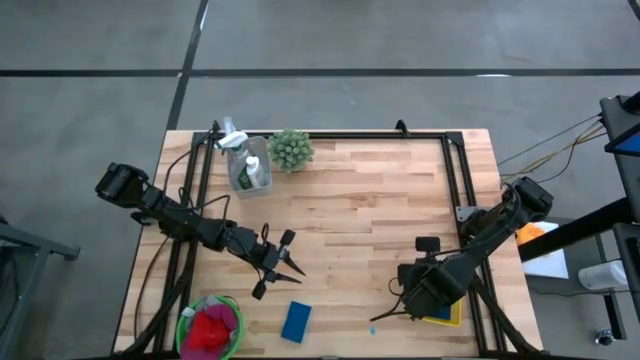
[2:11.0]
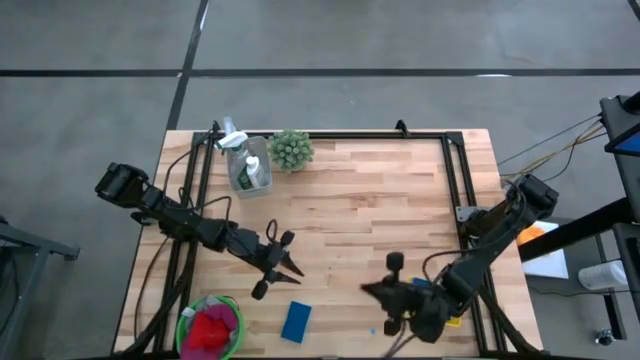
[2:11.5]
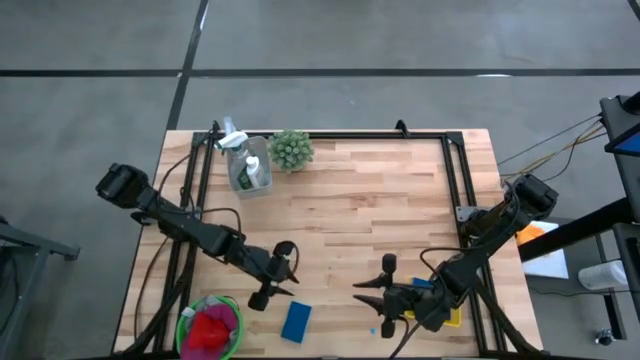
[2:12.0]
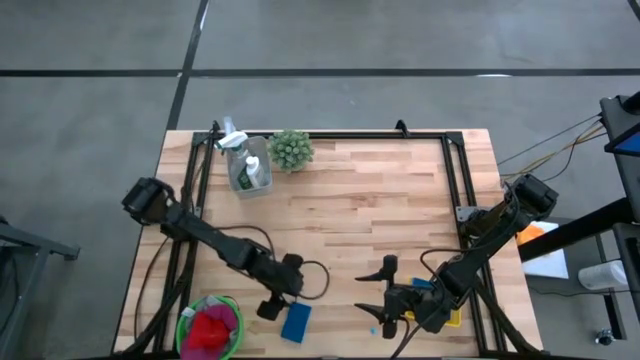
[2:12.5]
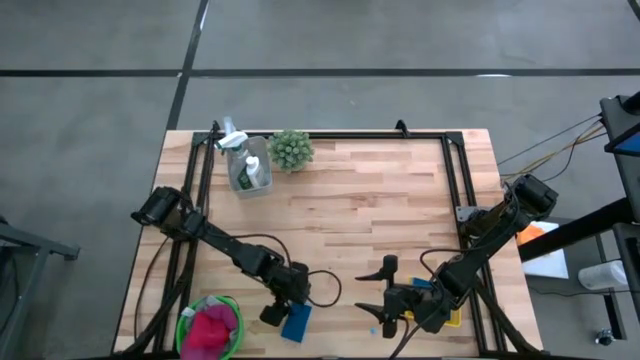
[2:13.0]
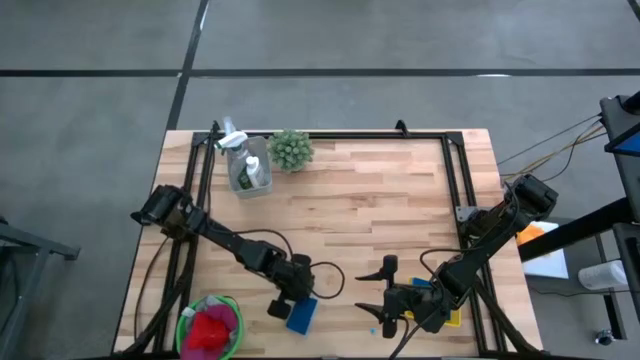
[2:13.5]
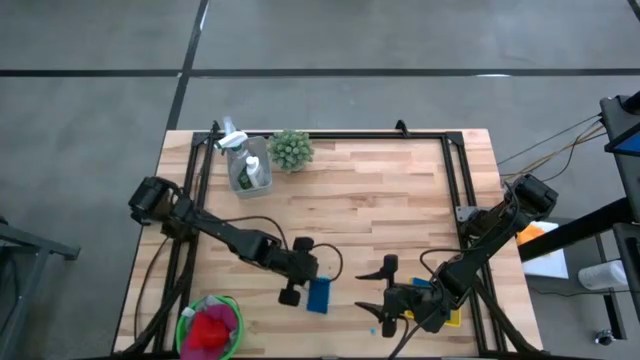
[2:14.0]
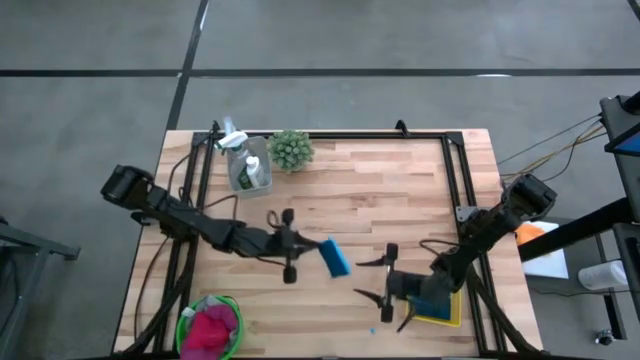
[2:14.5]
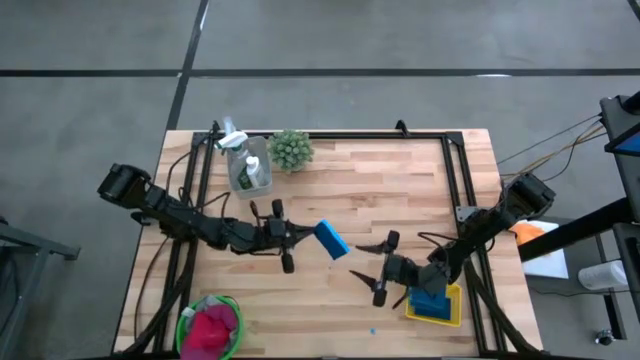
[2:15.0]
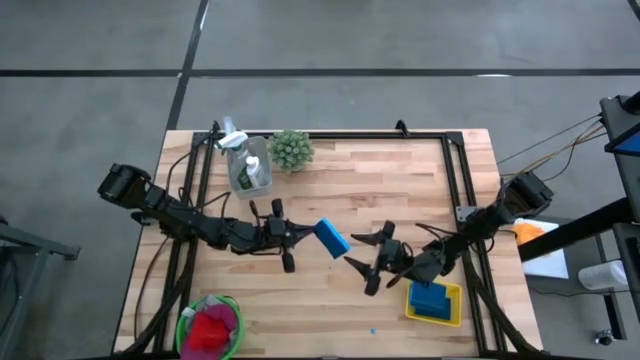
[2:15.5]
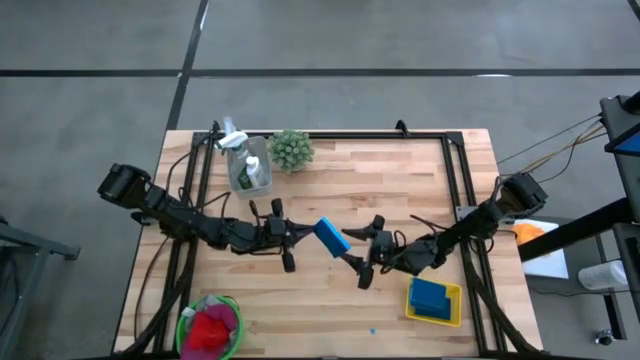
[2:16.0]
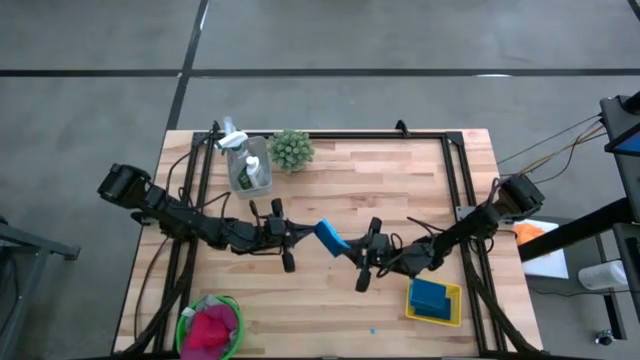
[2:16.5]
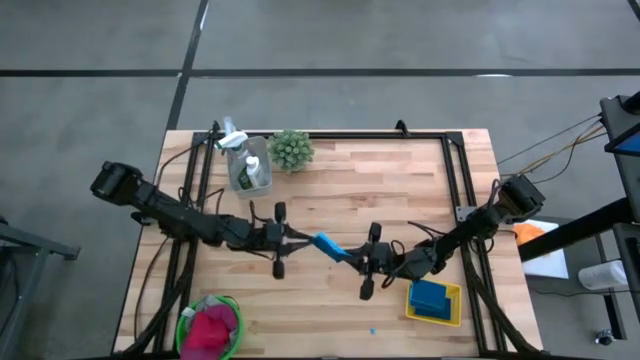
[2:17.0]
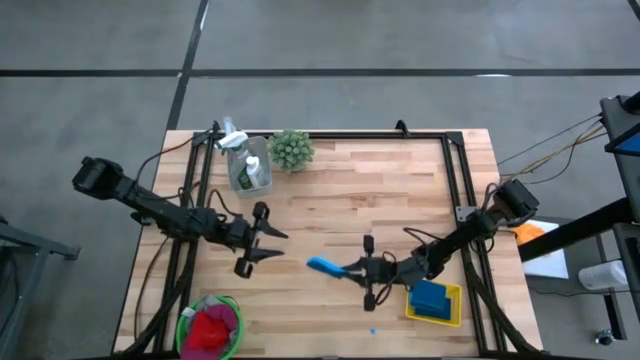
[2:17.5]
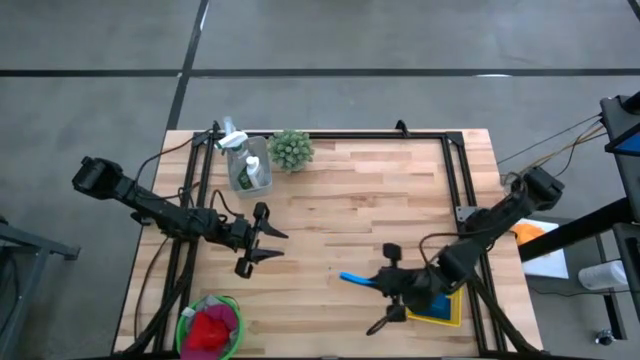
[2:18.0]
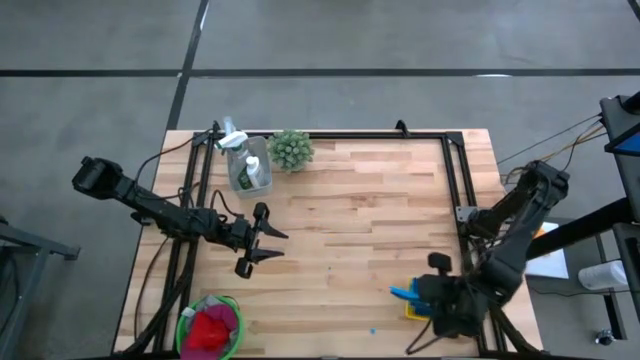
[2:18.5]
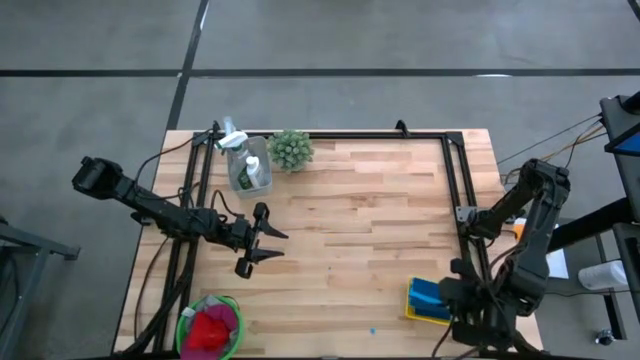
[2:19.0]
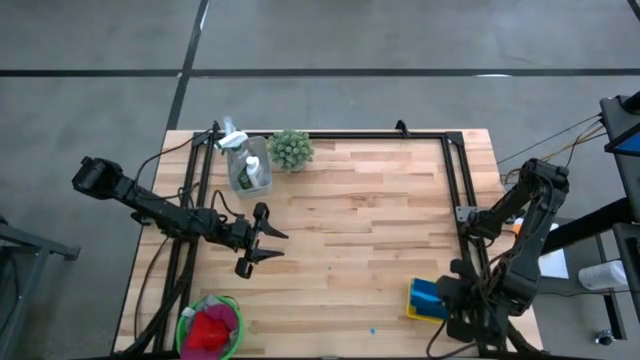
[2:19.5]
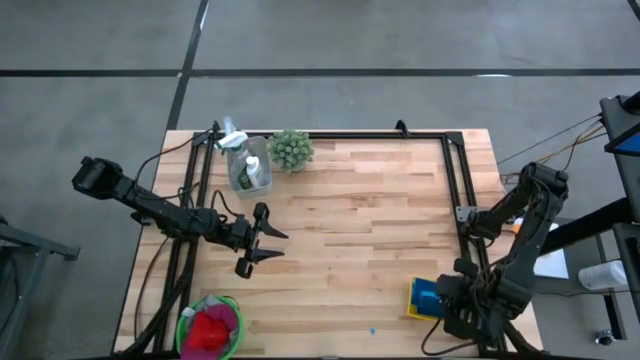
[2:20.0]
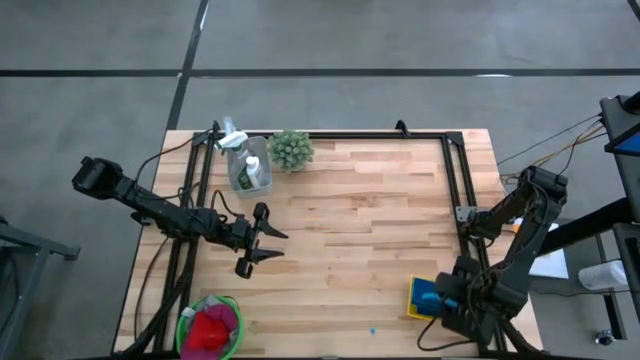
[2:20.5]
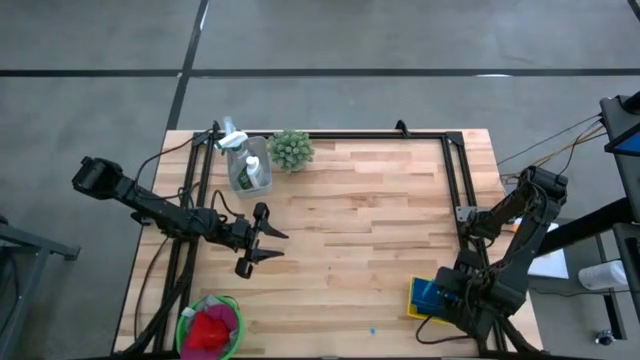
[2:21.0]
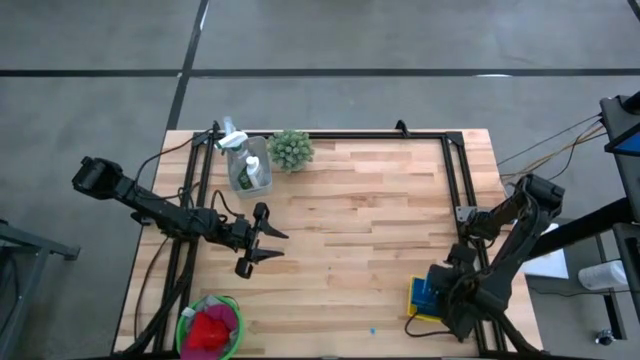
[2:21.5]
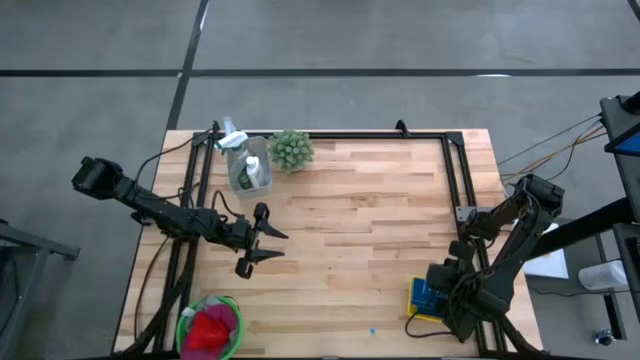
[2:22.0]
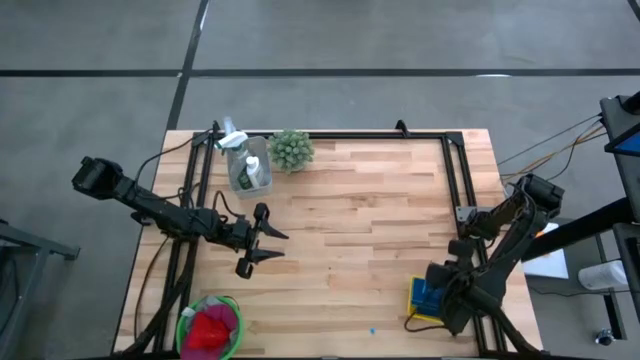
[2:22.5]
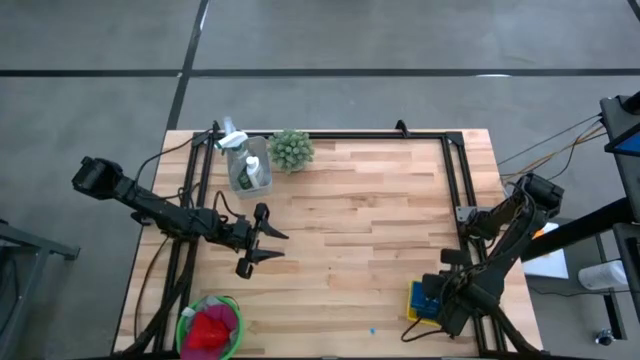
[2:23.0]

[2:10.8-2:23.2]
Task: Pick & Place Kitchen Items
Put the blue sponge into the yellow bin

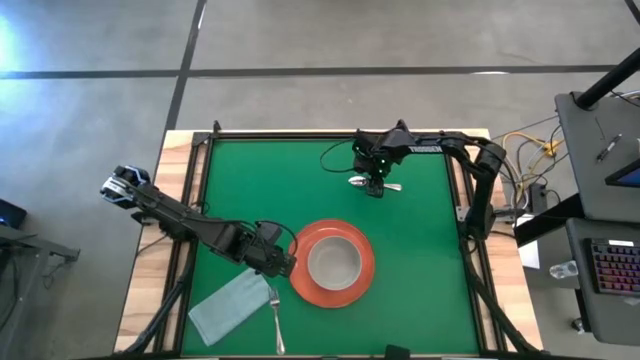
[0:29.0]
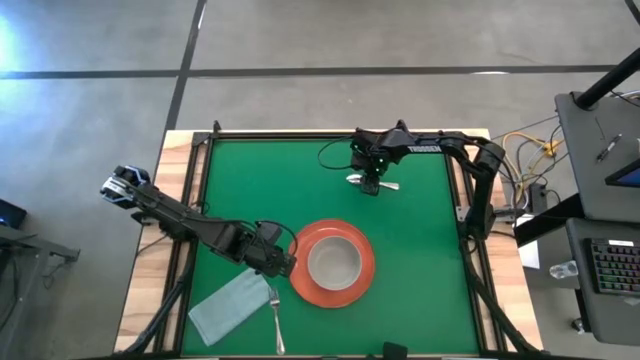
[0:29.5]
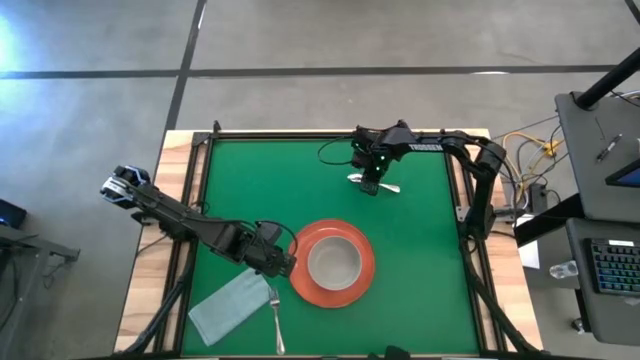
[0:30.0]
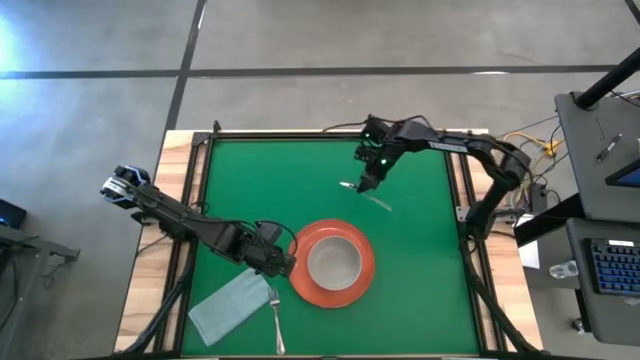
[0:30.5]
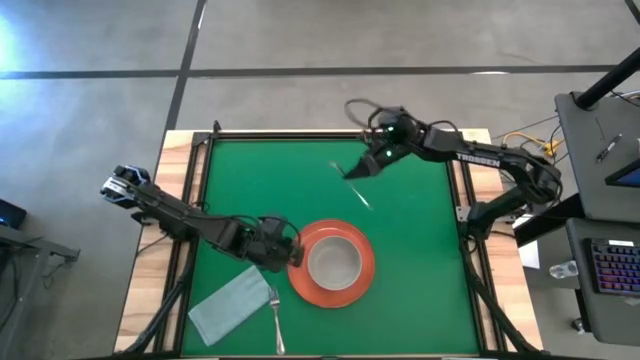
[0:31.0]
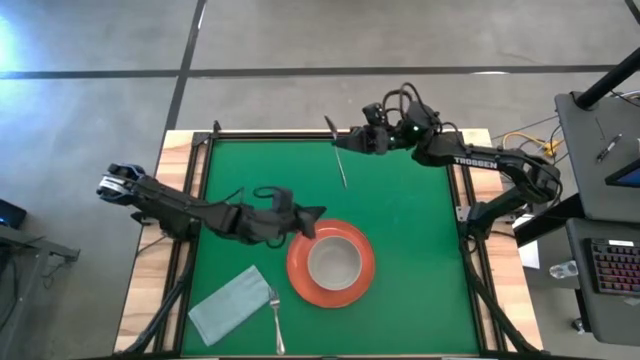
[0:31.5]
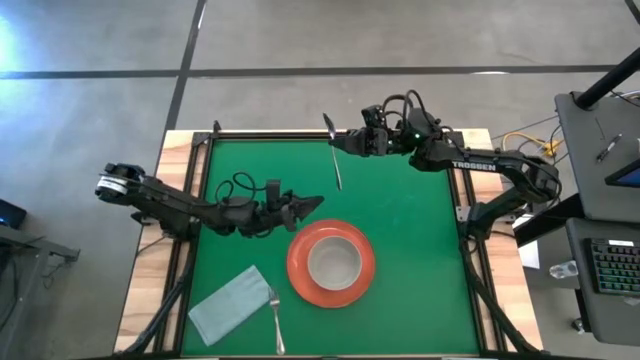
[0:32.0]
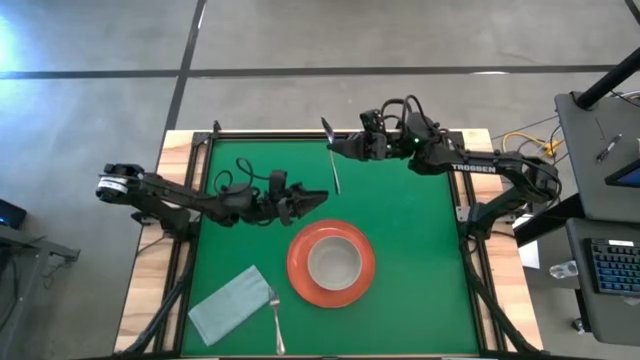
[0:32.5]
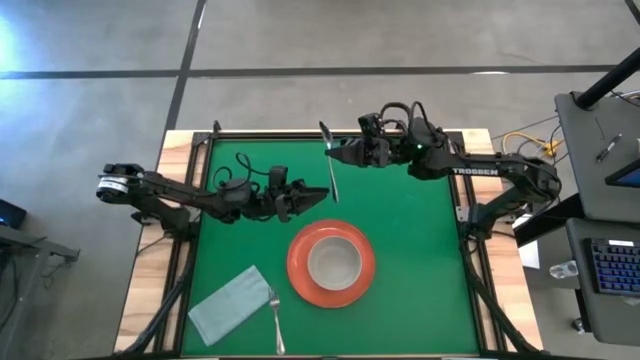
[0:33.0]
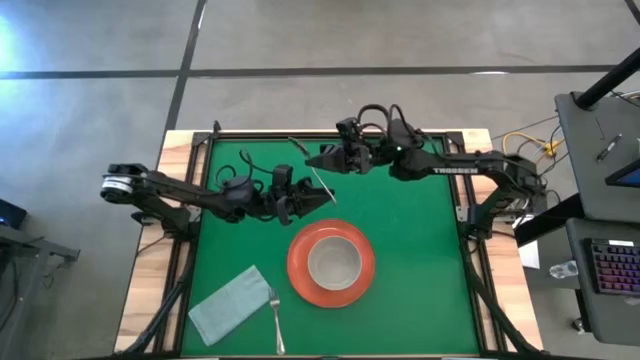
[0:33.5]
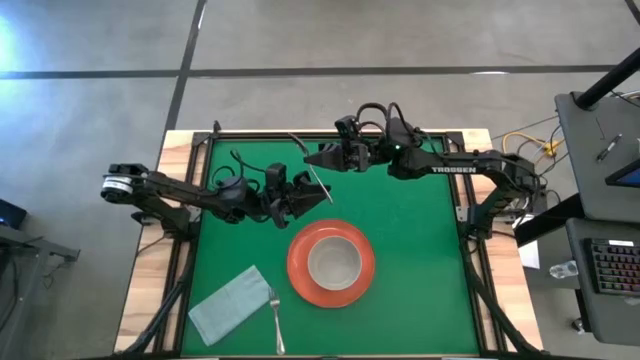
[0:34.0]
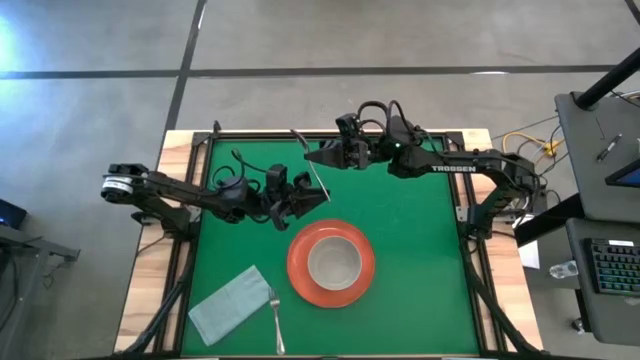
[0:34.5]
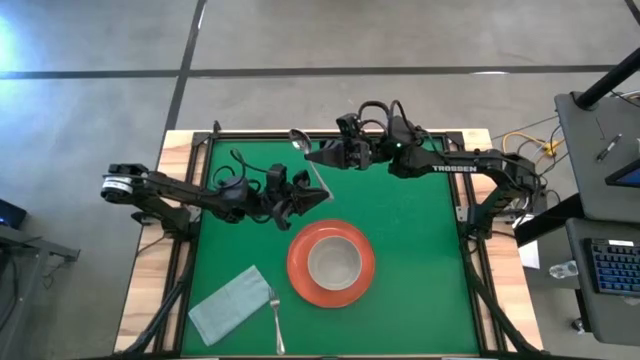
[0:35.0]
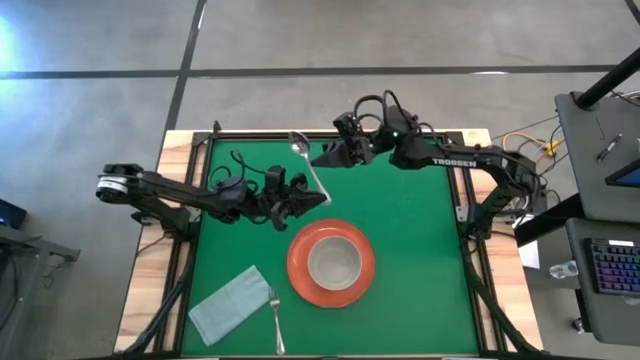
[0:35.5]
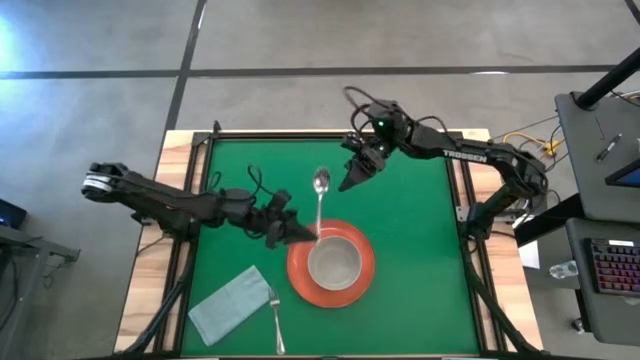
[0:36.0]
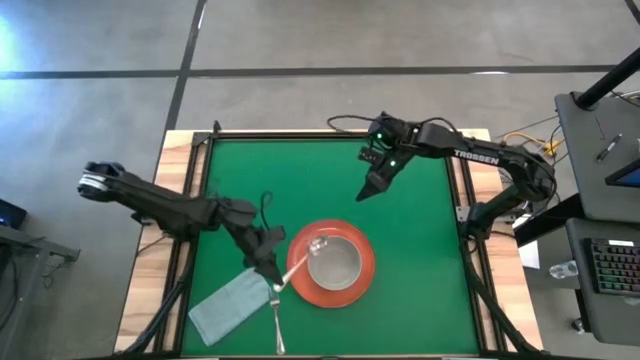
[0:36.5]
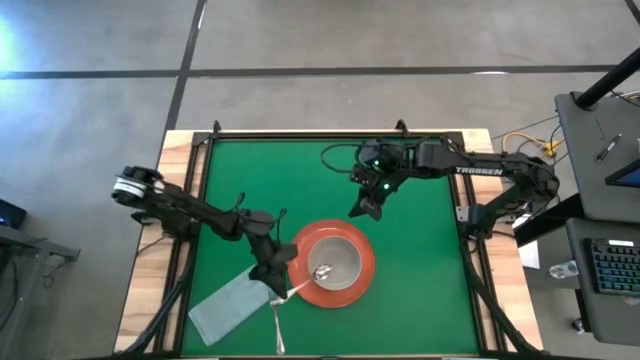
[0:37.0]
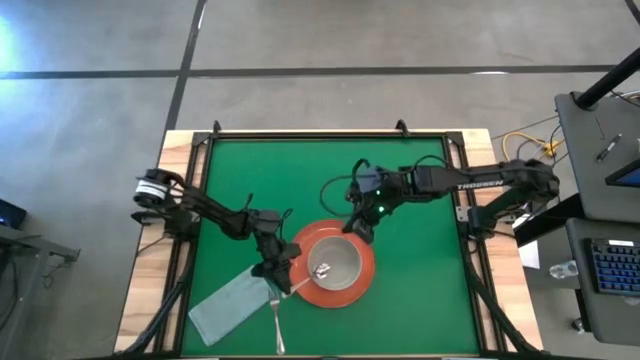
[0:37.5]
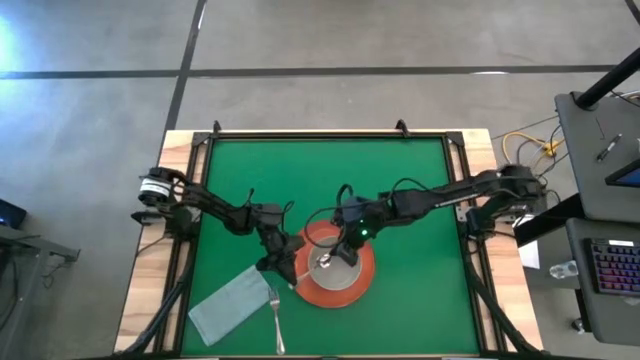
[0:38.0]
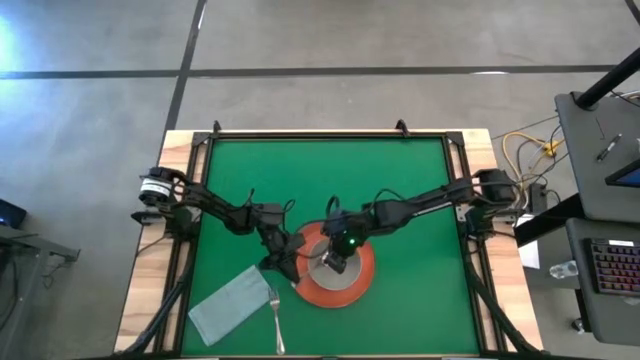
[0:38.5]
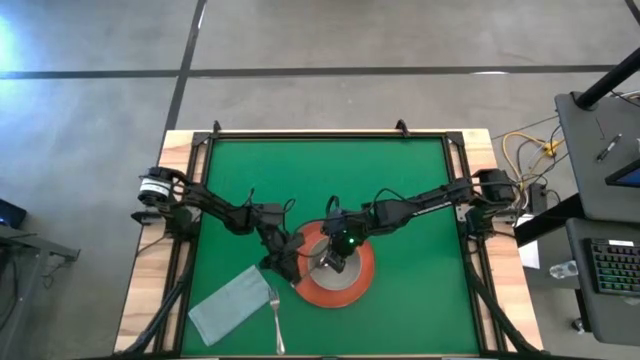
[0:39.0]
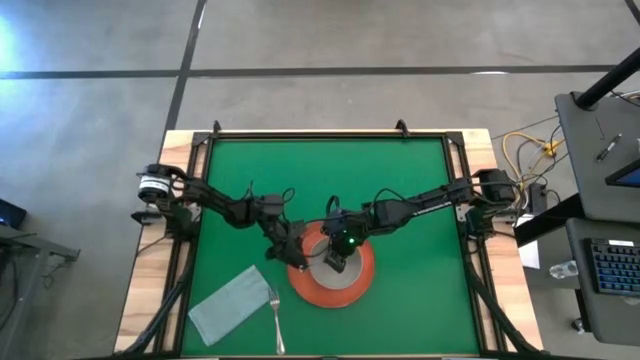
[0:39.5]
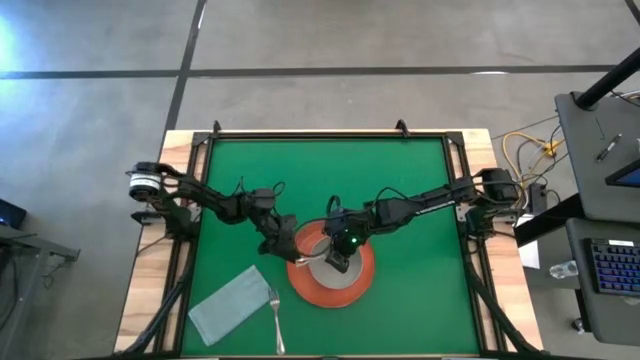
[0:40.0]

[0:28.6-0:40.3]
Task: Set table place
Put the silver spoon into the gray bowl
